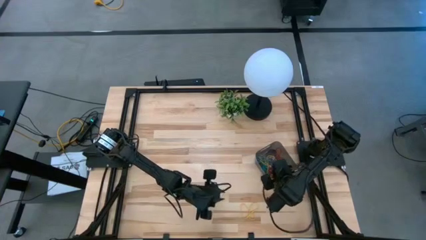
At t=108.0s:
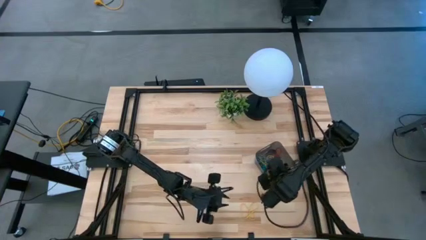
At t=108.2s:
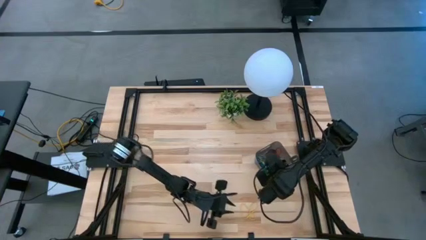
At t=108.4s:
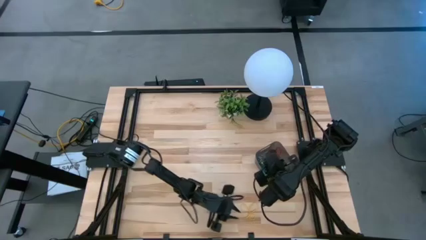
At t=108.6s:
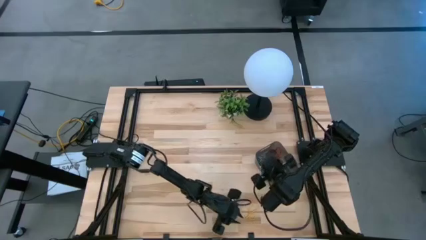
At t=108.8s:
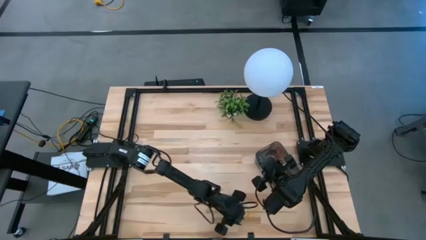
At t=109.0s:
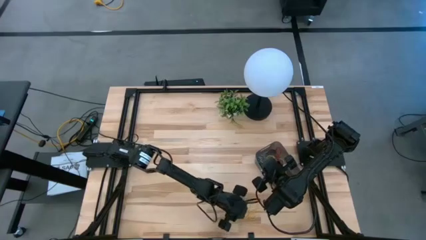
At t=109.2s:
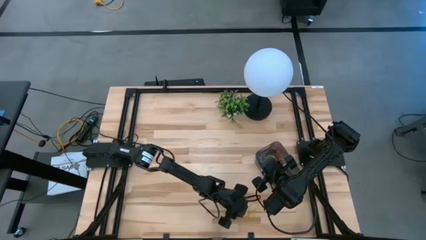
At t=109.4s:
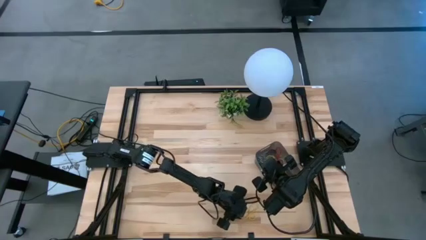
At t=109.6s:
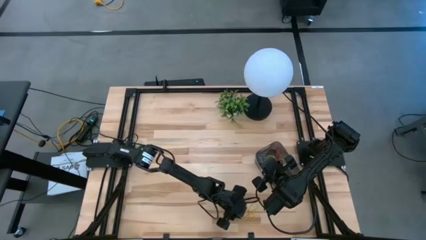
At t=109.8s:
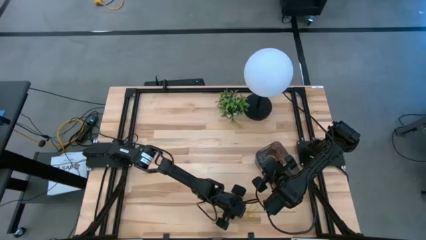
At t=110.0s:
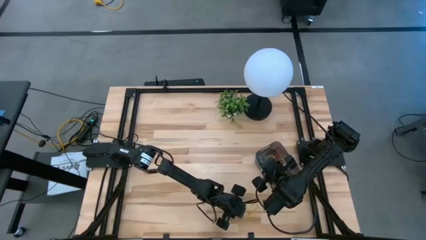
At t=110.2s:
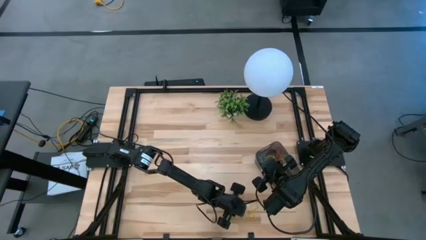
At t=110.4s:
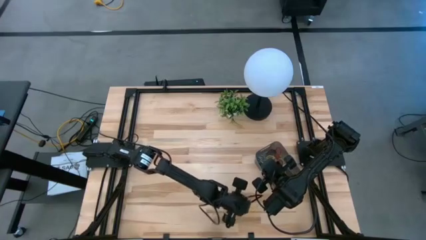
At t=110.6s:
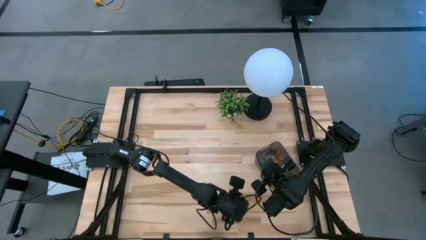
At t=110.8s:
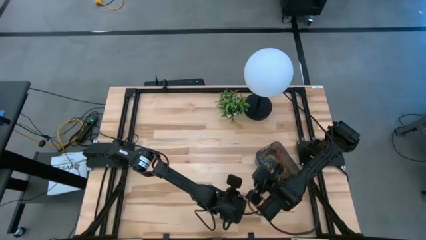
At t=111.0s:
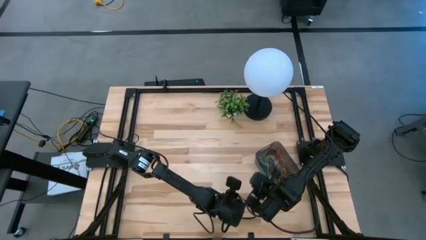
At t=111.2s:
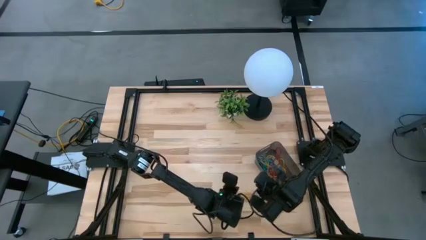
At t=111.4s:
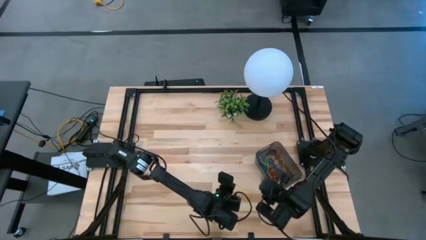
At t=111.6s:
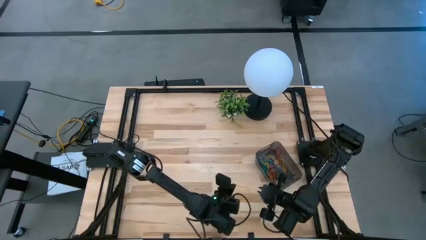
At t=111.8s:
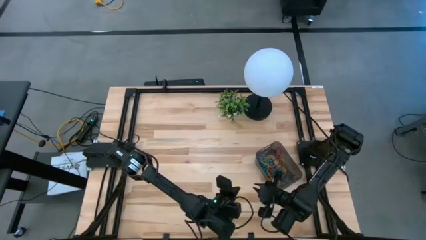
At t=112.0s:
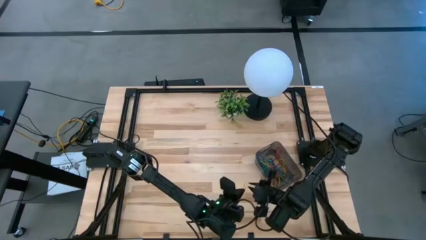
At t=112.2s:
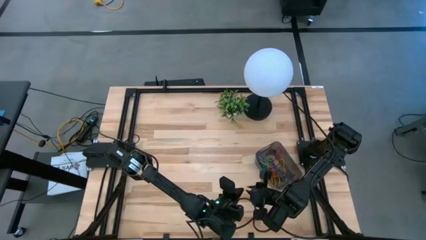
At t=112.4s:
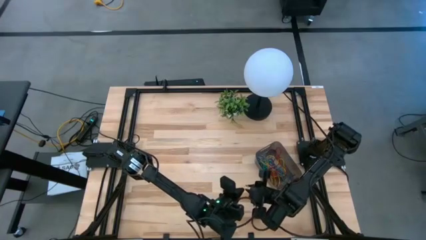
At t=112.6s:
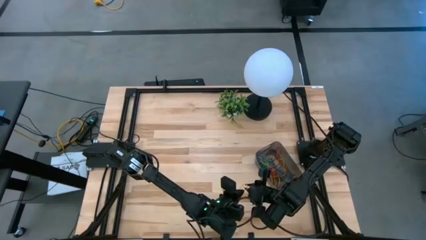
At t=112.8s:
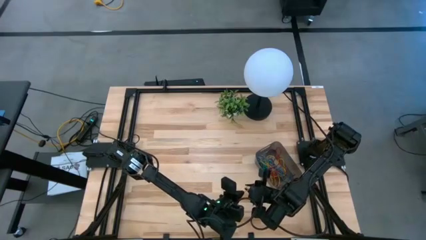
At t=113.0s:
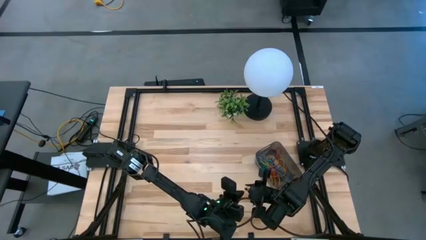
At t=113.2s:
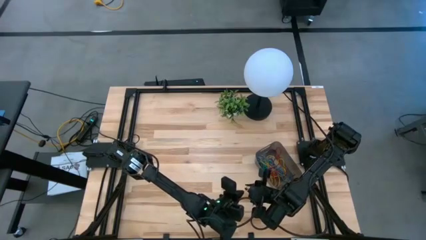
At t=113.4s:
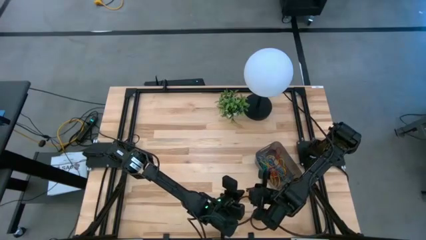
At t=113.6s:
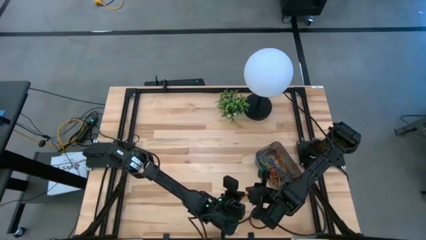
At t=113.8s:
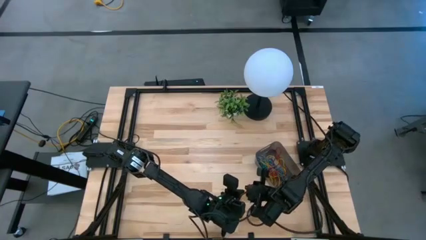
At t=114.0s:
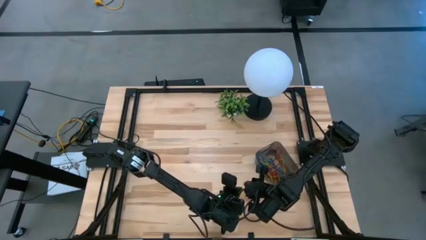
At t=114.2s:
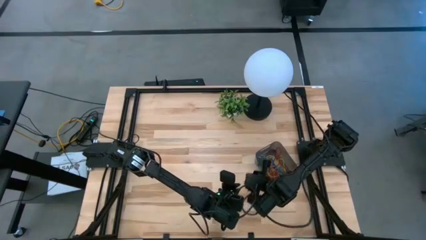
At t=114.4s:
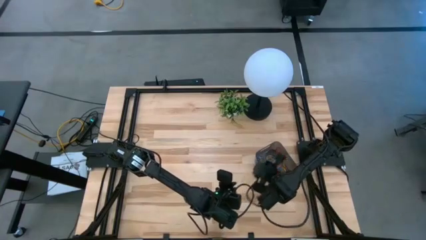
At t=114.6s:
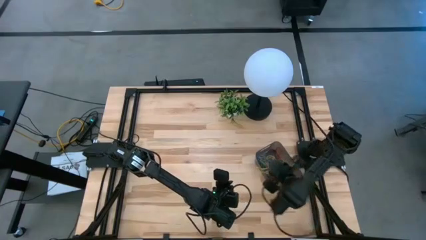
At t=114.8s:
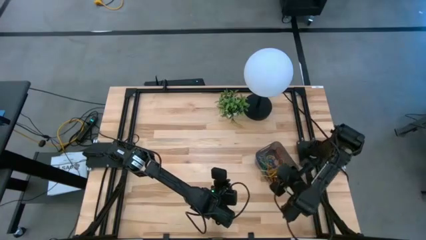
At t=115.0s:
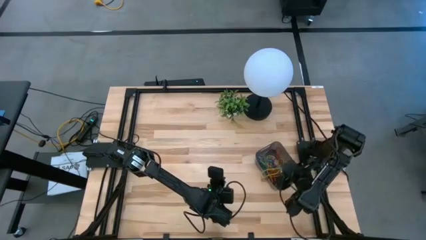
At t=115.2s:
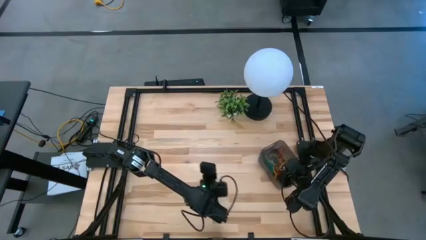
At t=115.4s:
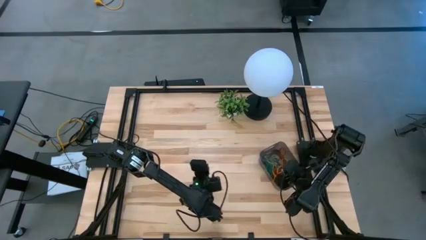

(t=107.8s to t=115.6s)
Task: Pick and place items into bin
Put the yellow rubber band into the black transparent bin
